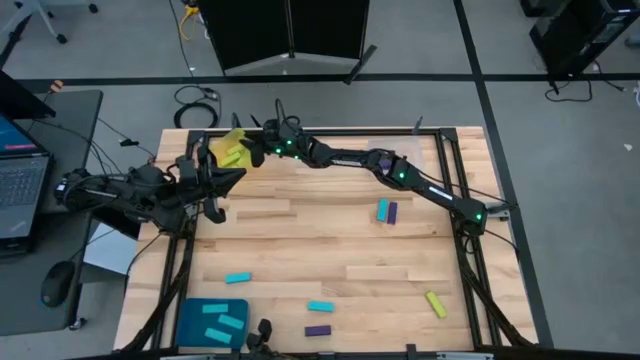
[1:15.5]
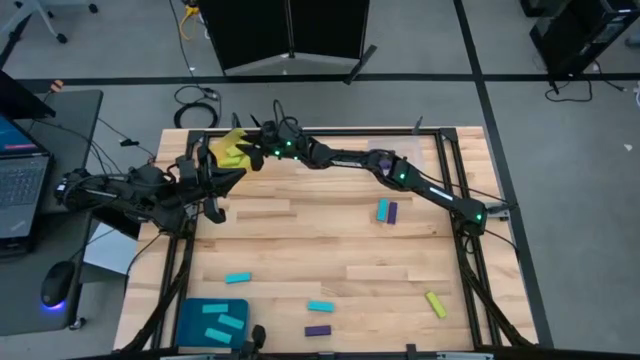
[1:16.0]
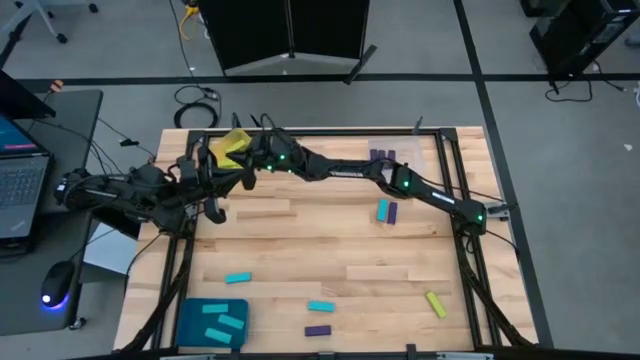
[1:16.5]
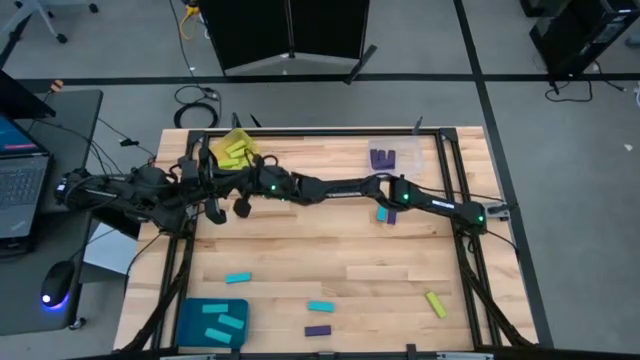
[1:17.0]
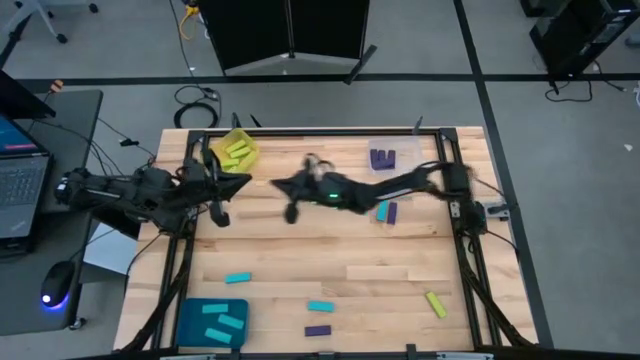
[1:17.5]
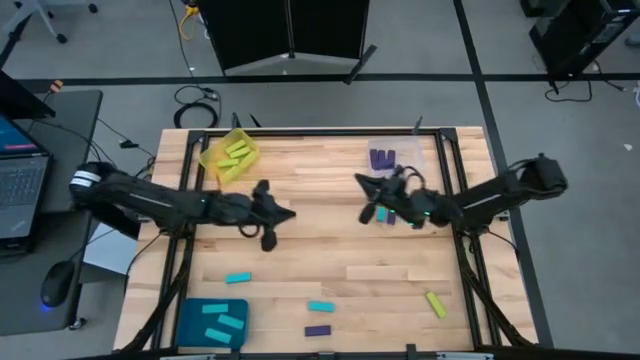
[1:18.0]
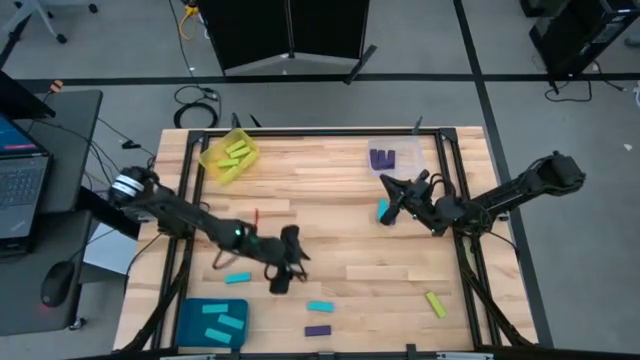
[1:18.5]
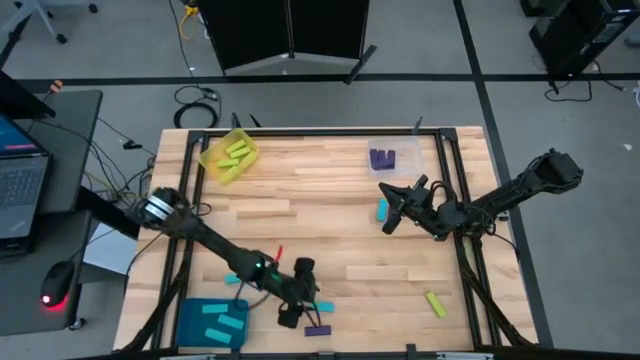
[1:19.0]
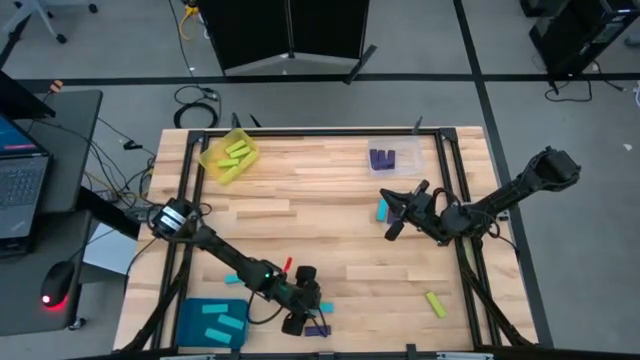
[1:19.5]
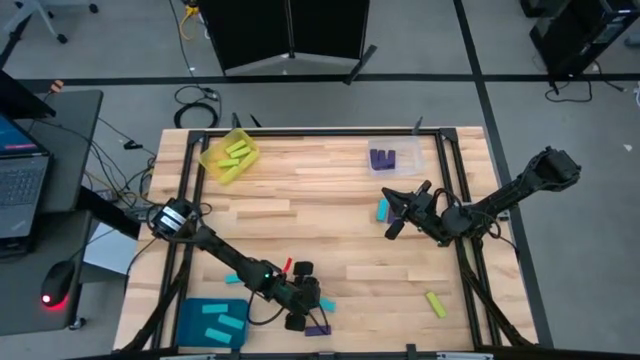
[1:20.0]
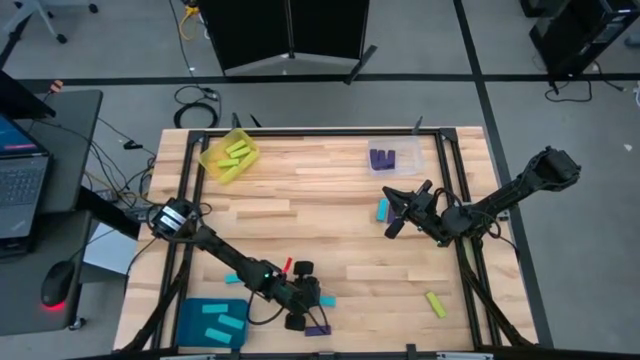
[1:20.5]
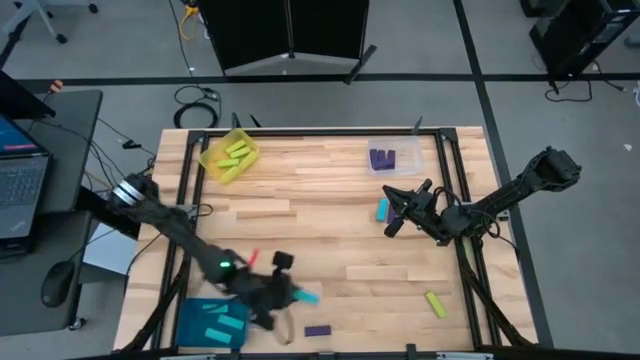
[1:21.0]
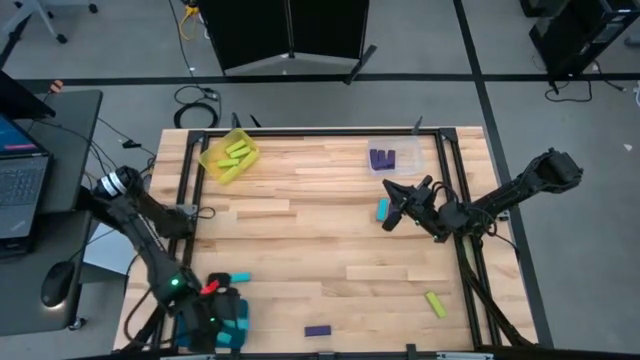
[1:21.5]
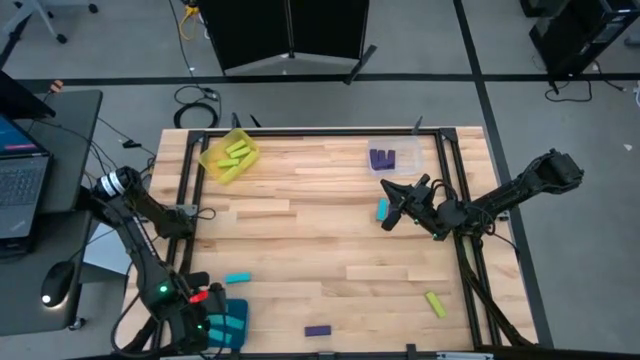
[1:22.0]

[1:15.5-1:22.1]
Task: Sort blocks
Put the light blue block into the blue bin

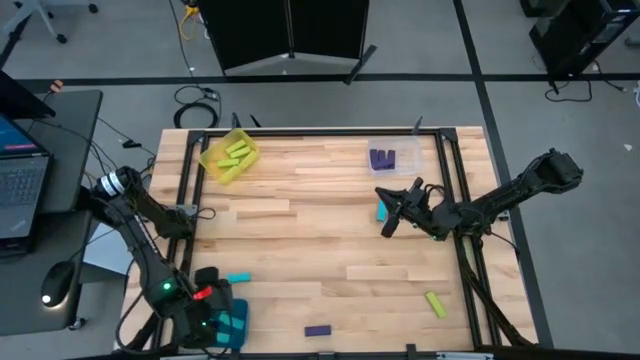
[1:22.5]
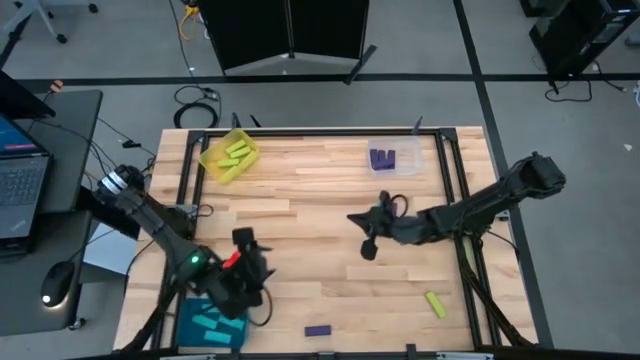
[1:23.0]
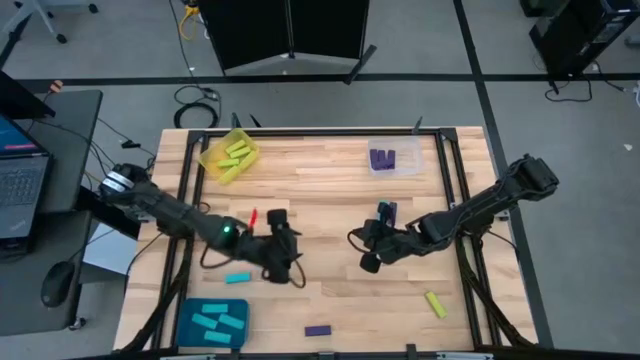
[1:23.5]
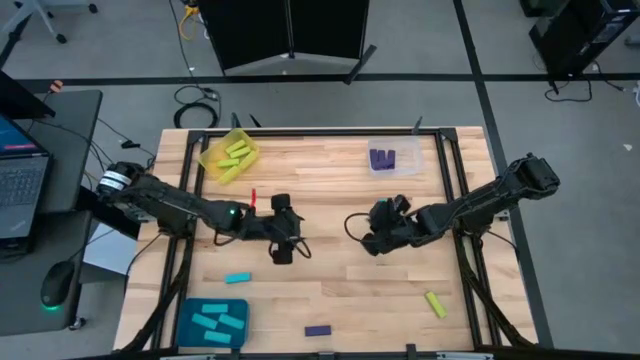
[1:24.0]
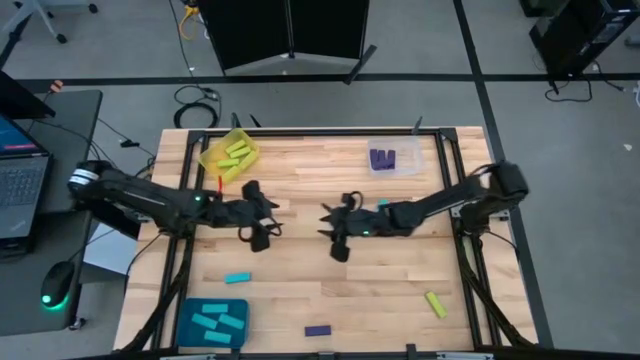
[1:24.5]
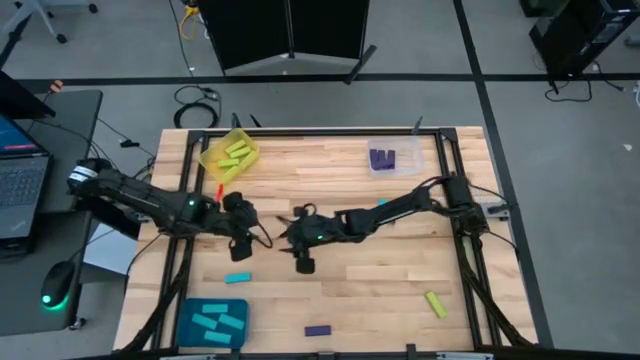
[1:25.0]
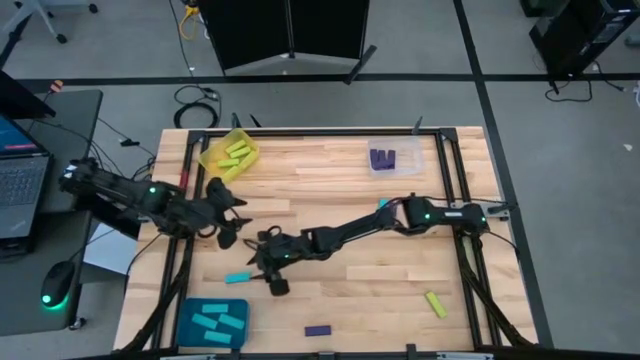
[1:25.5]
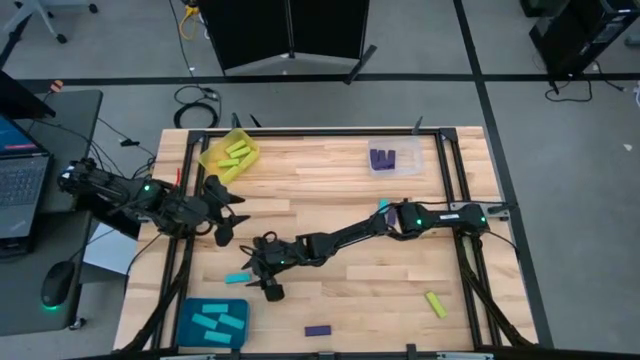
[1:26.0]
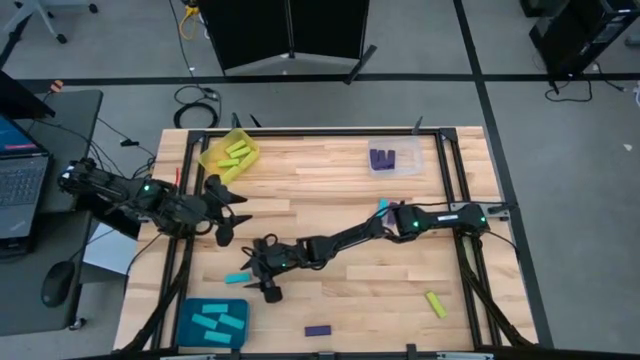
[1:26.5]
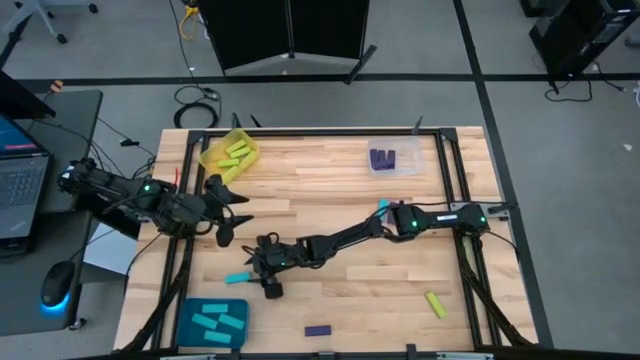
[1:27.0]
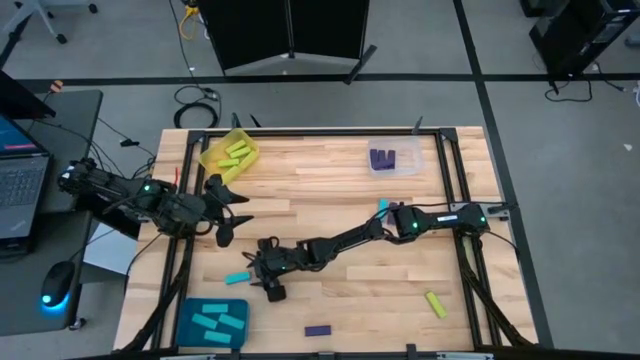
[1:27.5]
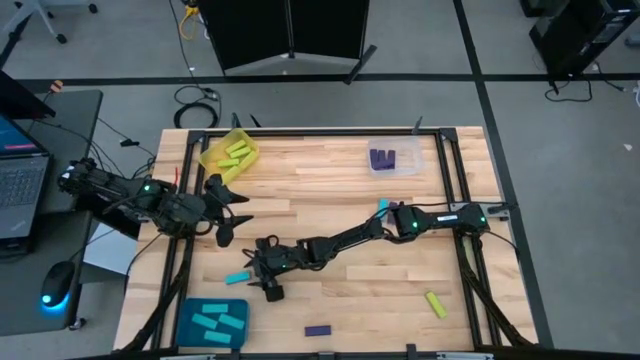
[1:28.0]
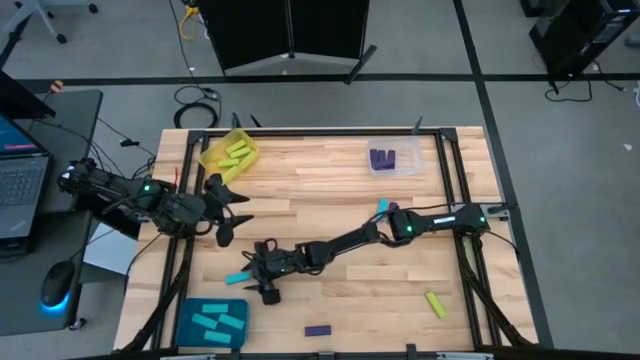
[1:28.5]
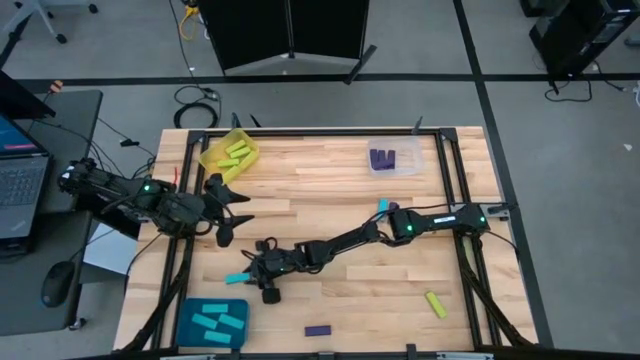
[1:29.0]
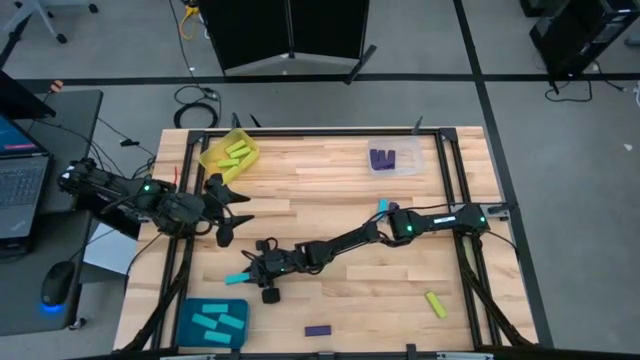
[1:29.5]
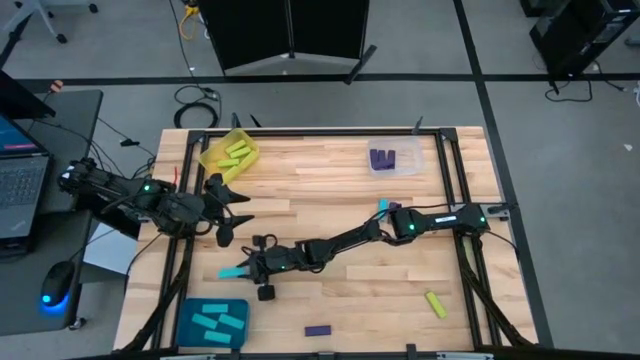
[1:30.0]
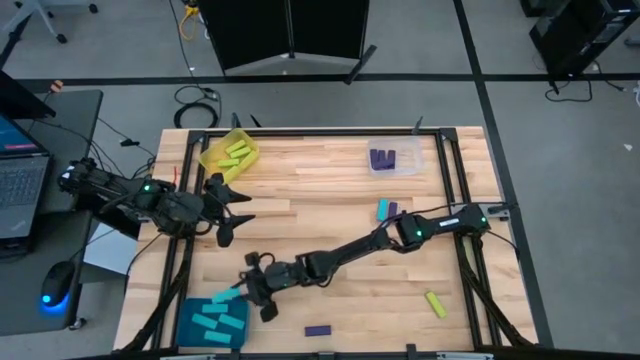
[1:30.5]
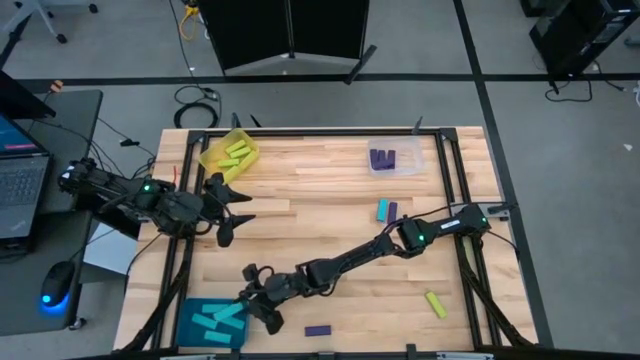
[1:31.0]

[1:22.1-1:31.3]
Put the light blue block into the blue bin

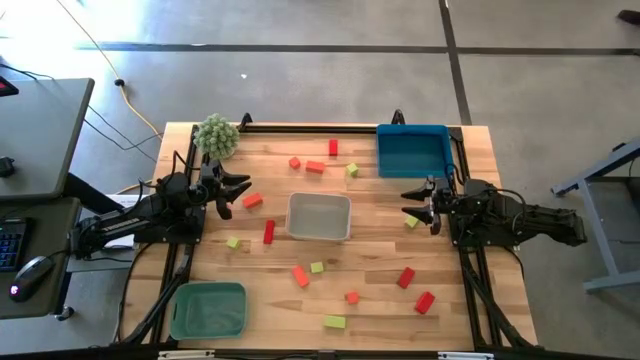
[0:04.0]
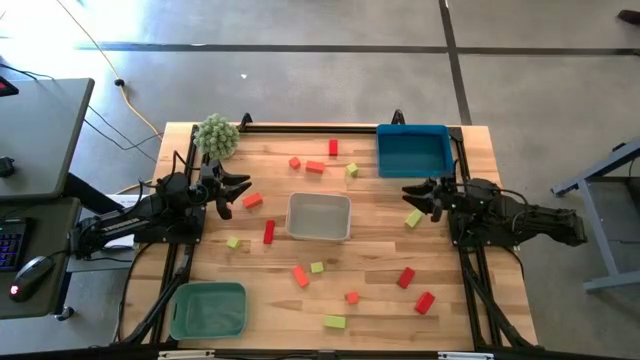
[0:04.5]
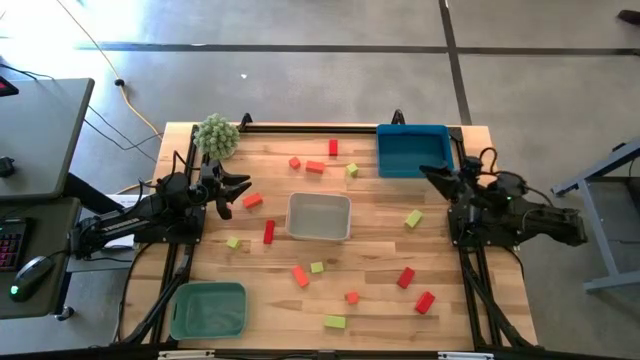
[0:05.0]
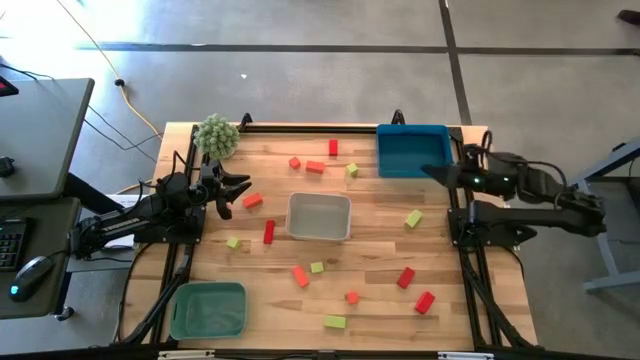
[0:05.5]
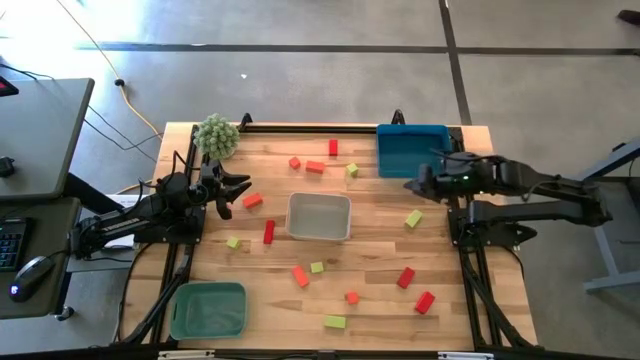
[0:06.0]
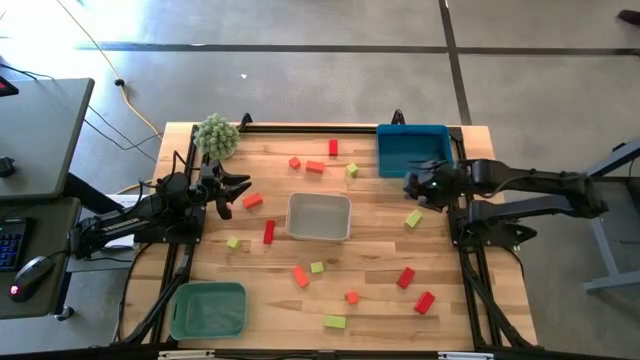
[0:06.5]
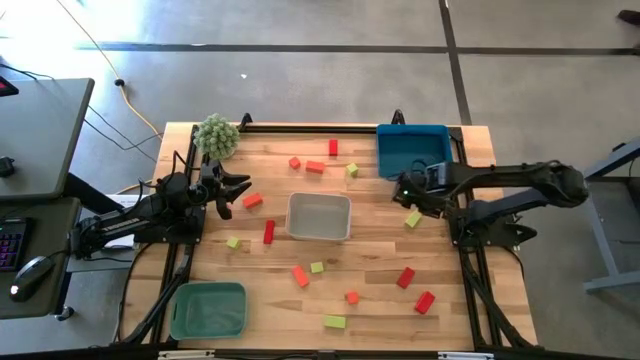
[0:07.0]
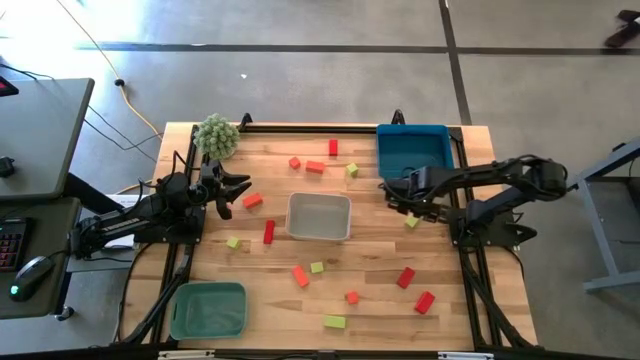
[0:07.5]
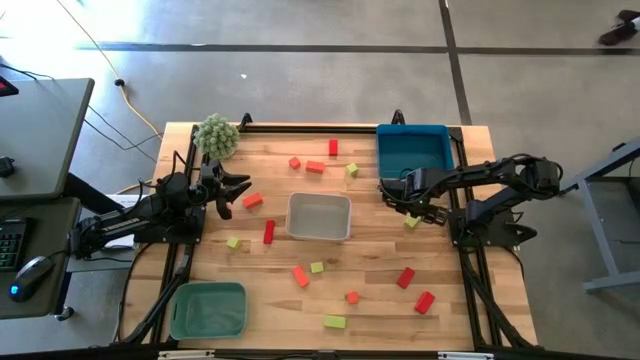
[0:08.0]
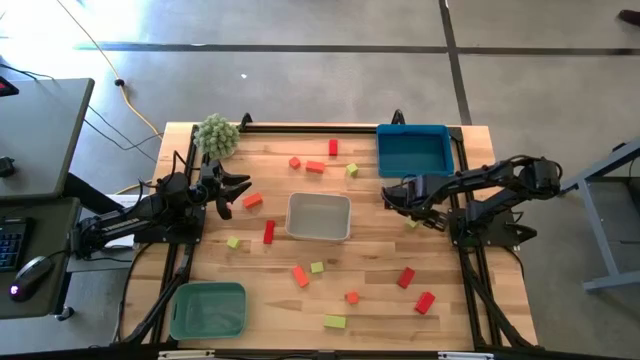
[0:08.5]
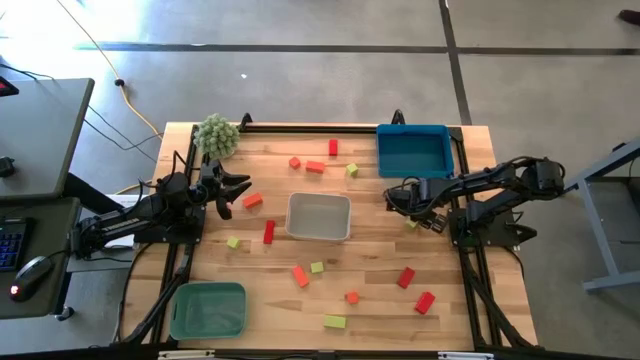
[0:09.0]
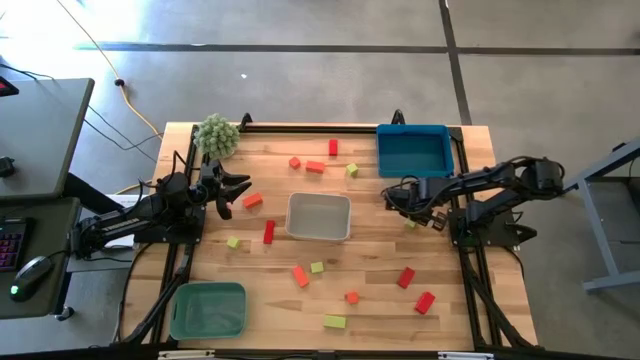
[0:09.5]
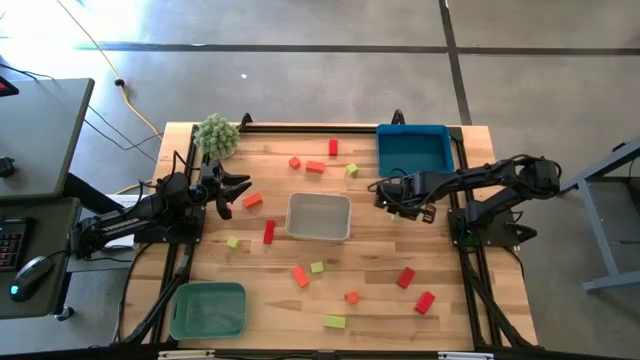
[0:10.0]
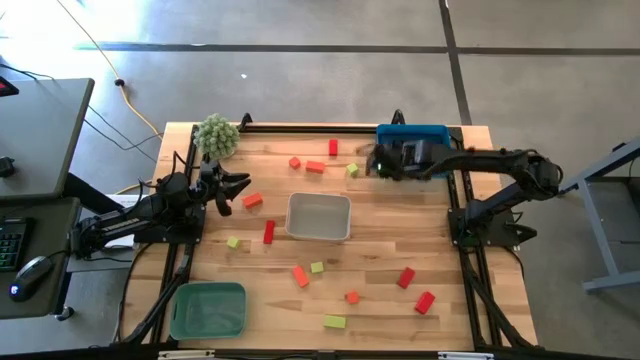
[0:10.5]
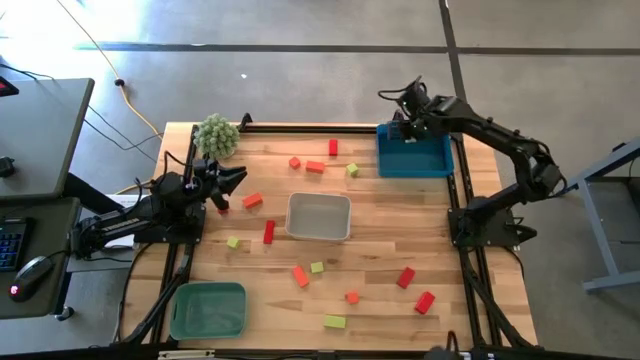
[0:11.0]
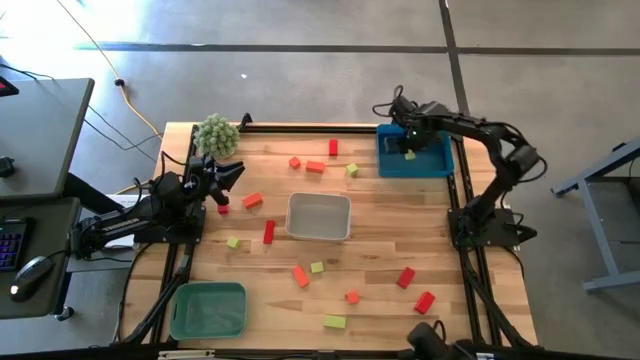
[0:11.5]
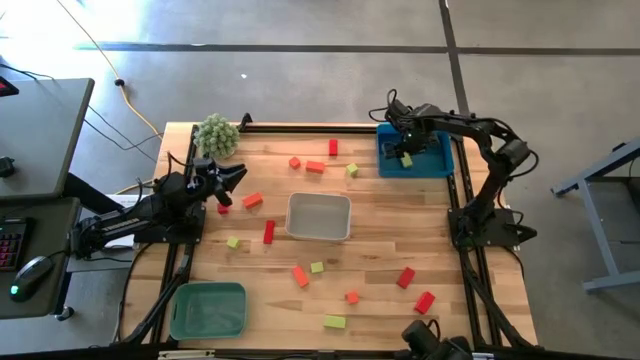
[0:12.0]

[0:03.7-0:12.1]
Task: Sort & place blocks by color
Put the green block into the blue bin
